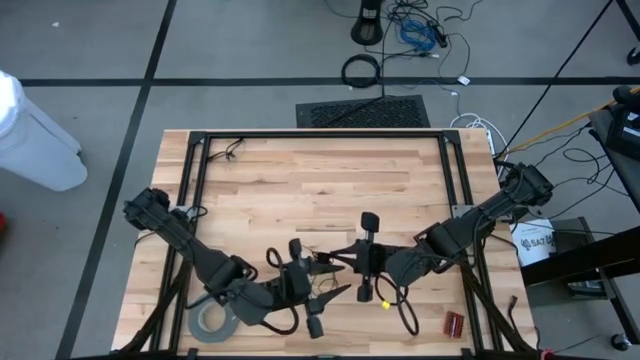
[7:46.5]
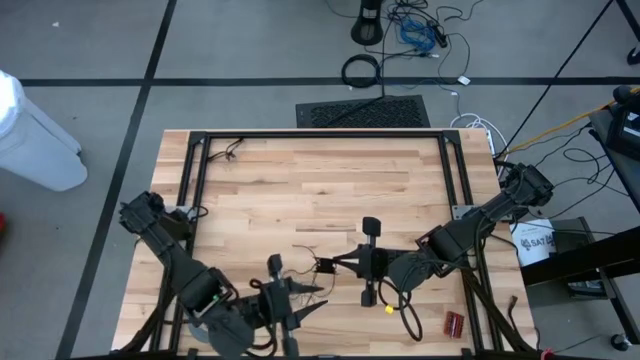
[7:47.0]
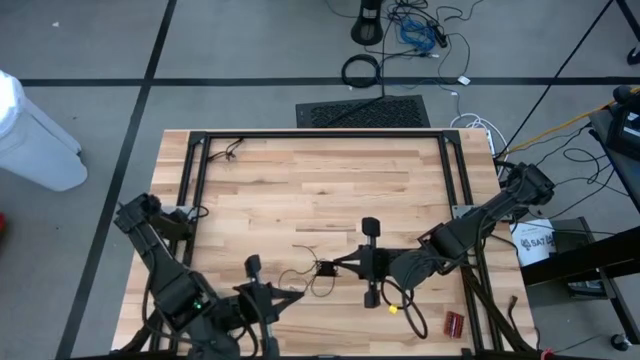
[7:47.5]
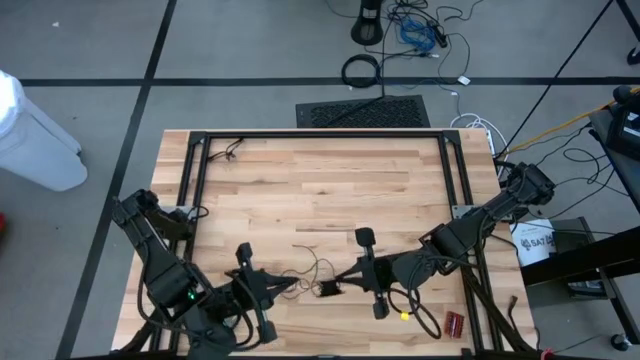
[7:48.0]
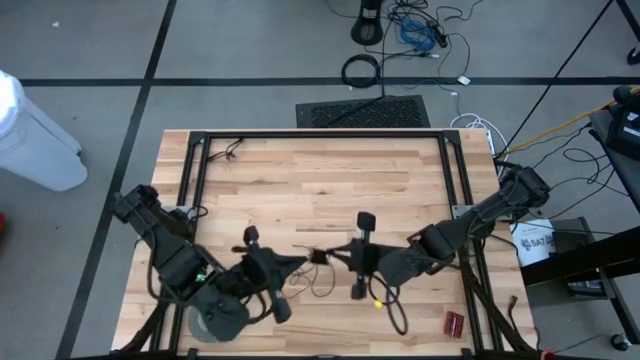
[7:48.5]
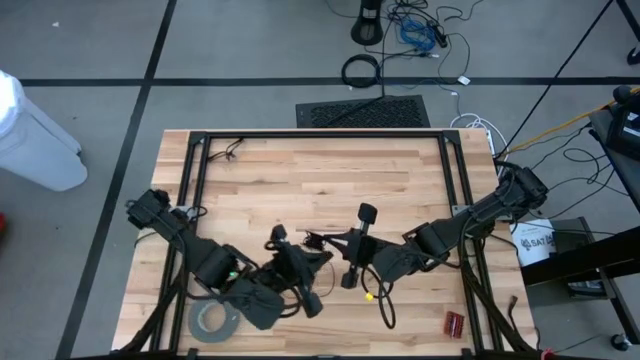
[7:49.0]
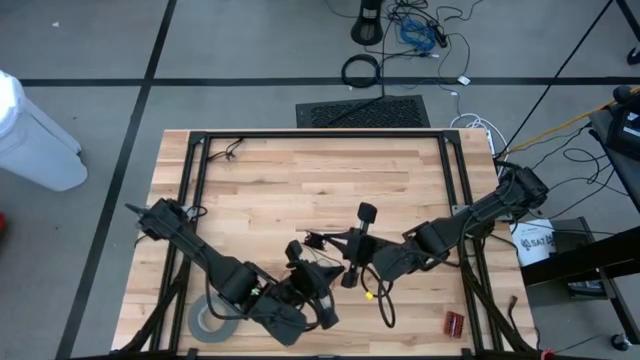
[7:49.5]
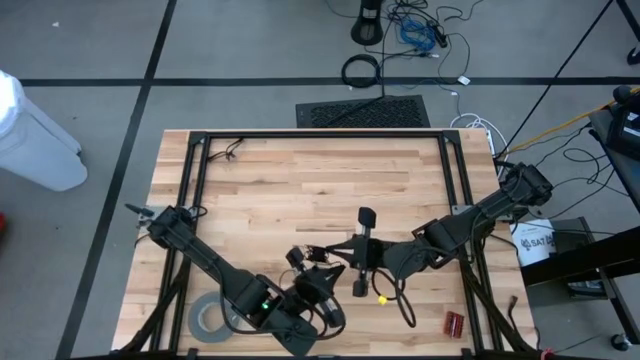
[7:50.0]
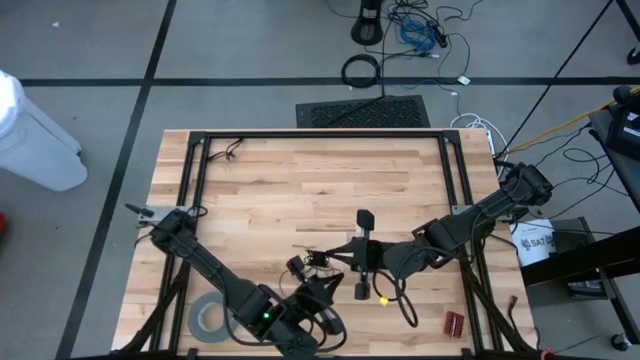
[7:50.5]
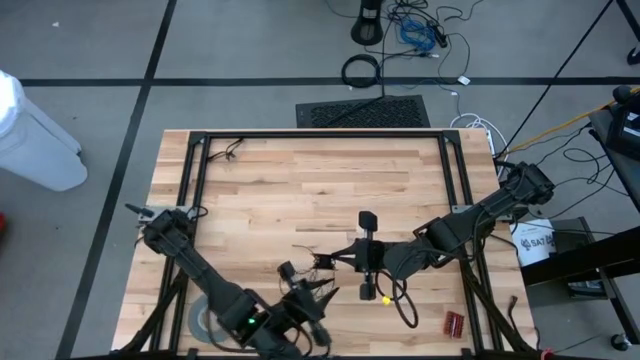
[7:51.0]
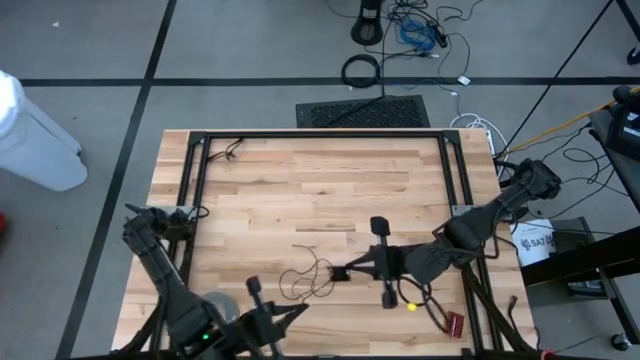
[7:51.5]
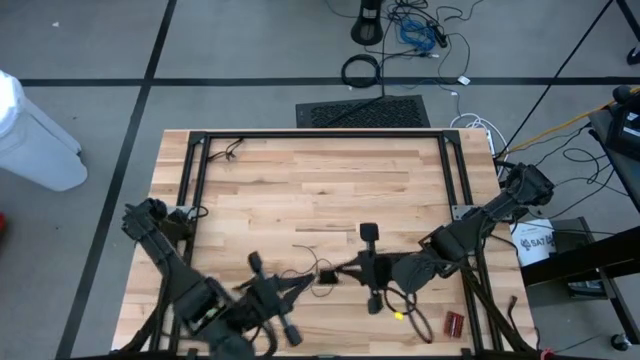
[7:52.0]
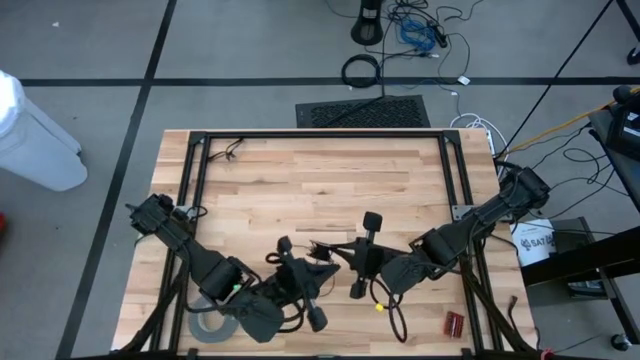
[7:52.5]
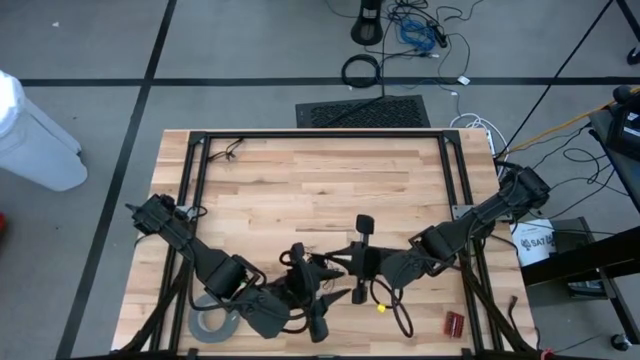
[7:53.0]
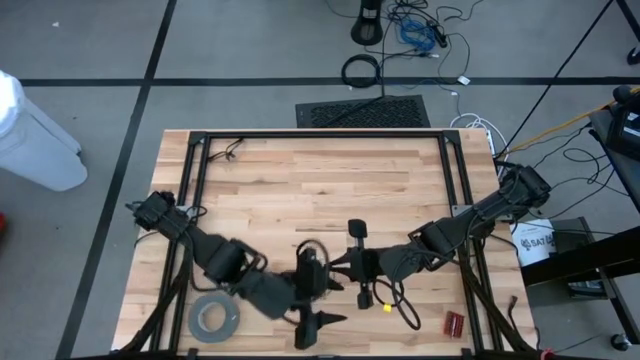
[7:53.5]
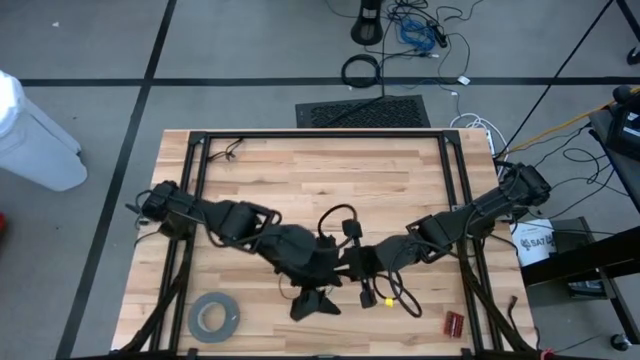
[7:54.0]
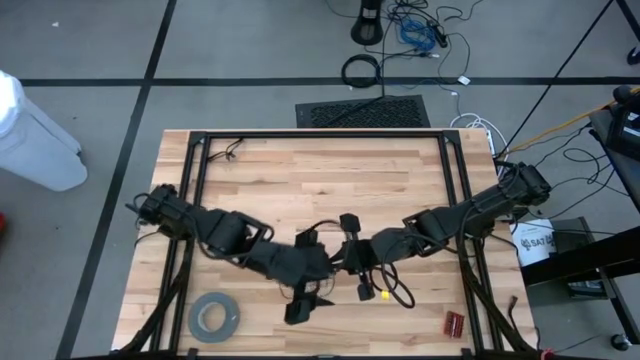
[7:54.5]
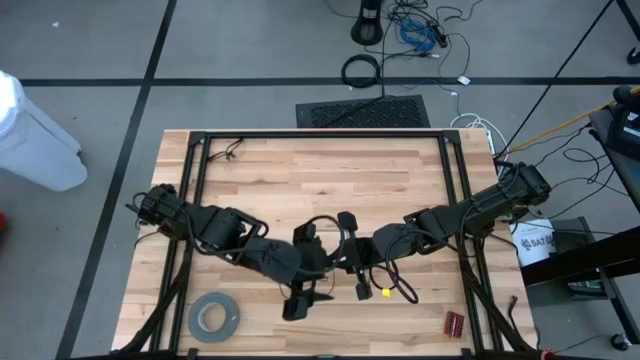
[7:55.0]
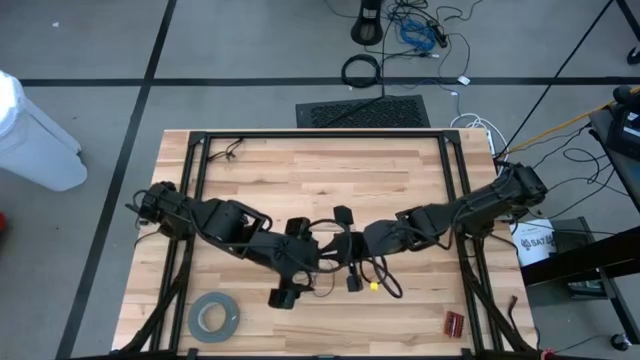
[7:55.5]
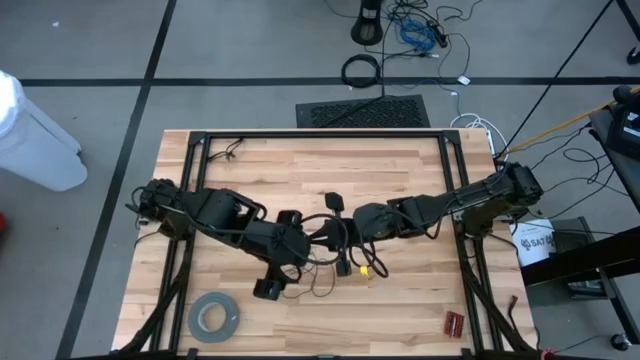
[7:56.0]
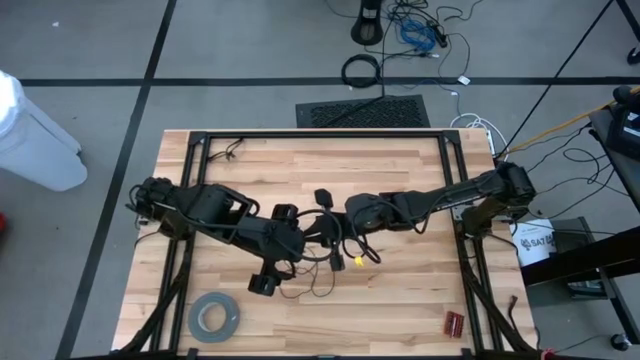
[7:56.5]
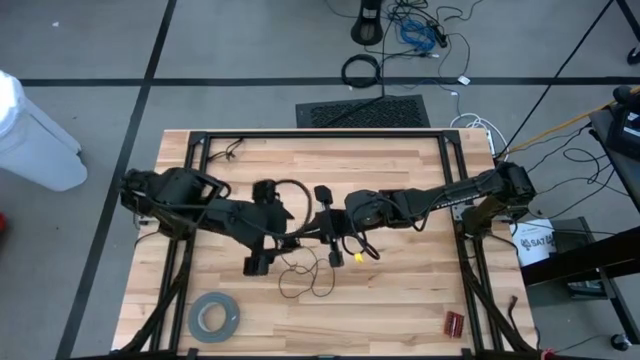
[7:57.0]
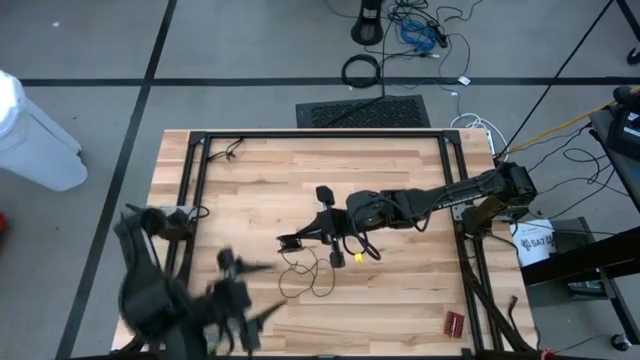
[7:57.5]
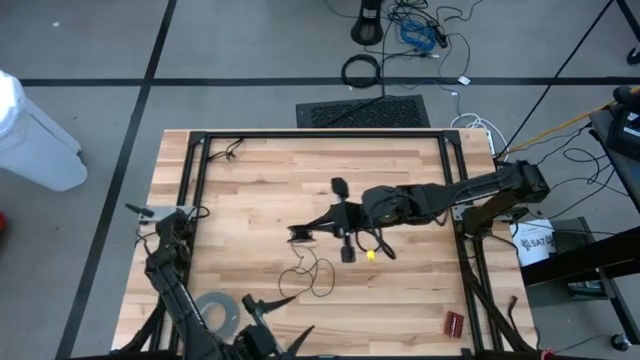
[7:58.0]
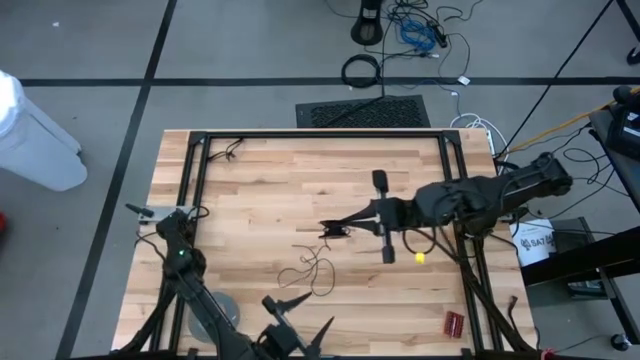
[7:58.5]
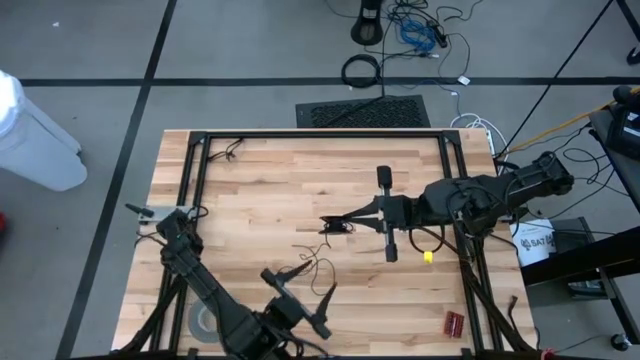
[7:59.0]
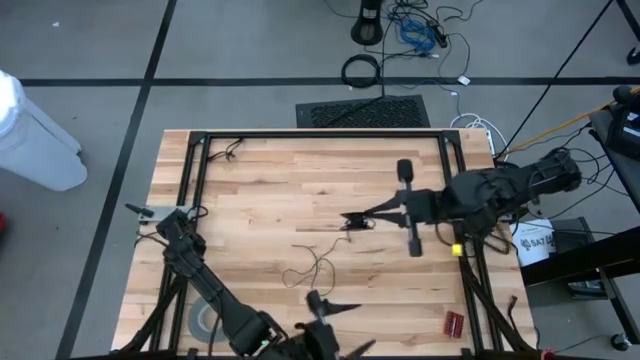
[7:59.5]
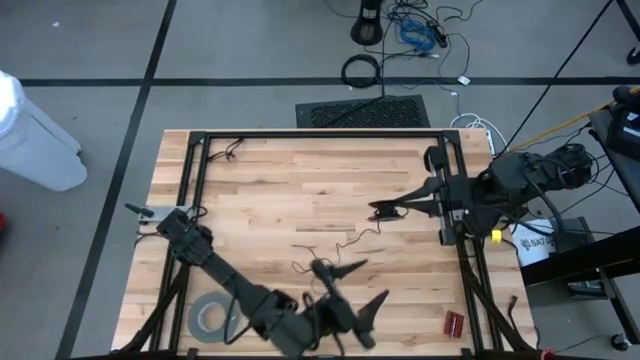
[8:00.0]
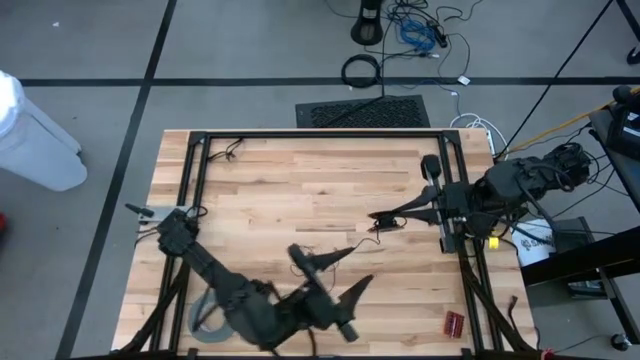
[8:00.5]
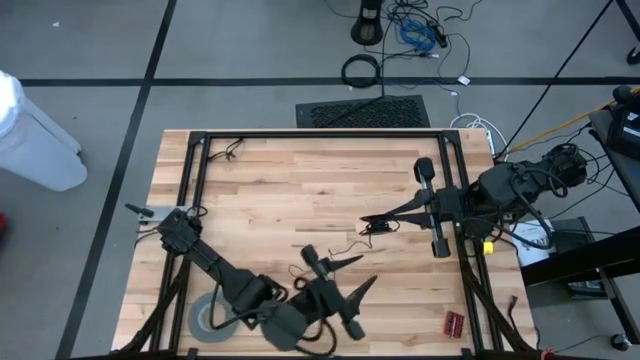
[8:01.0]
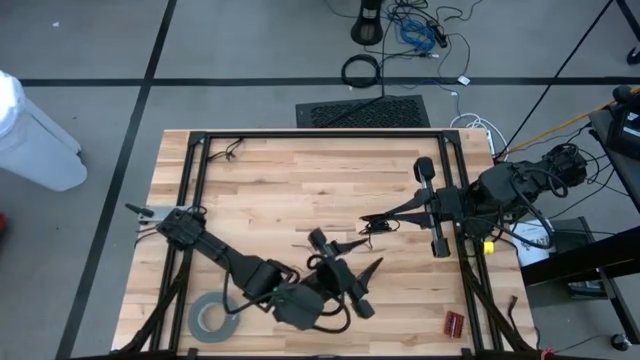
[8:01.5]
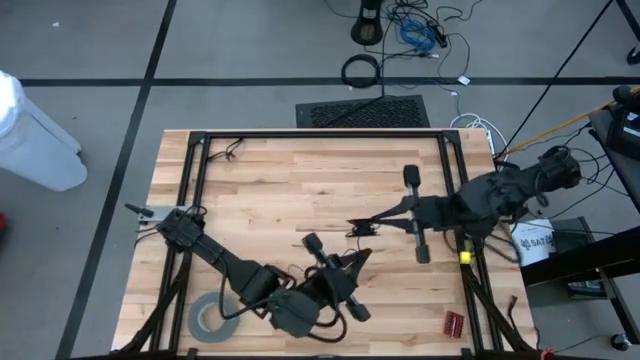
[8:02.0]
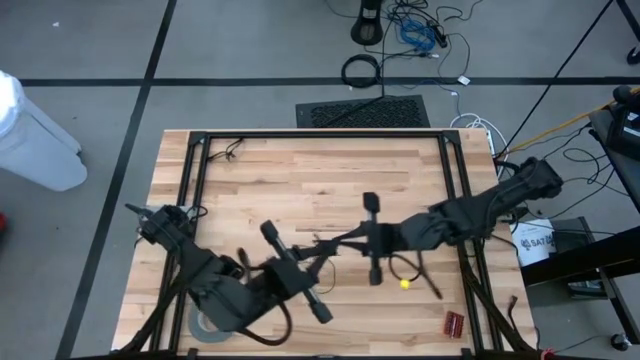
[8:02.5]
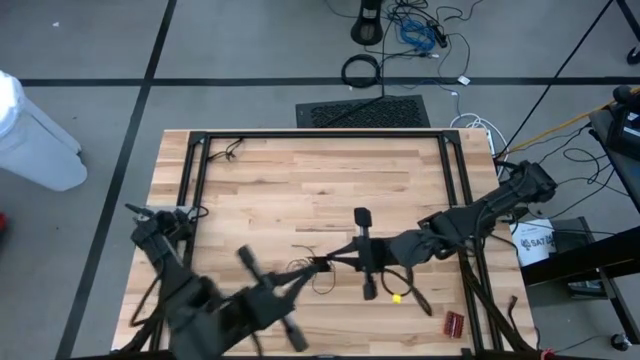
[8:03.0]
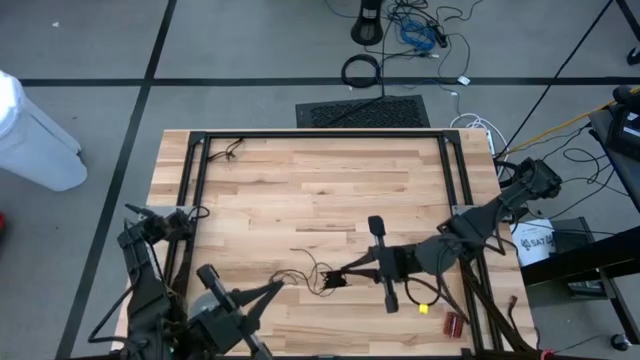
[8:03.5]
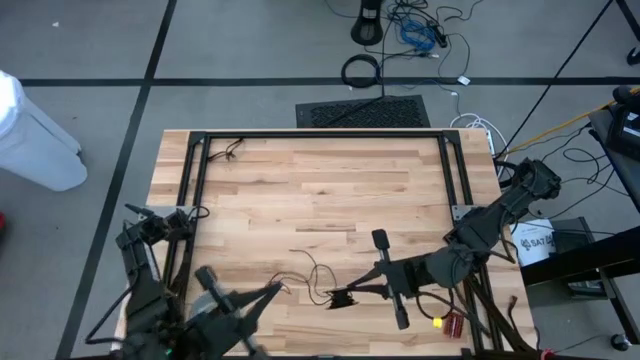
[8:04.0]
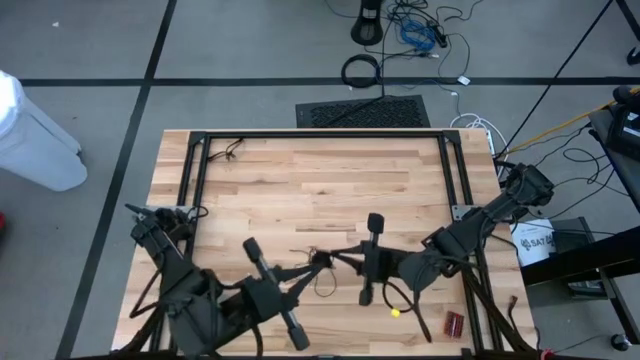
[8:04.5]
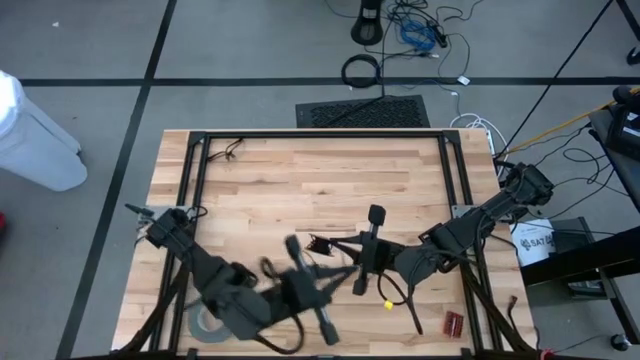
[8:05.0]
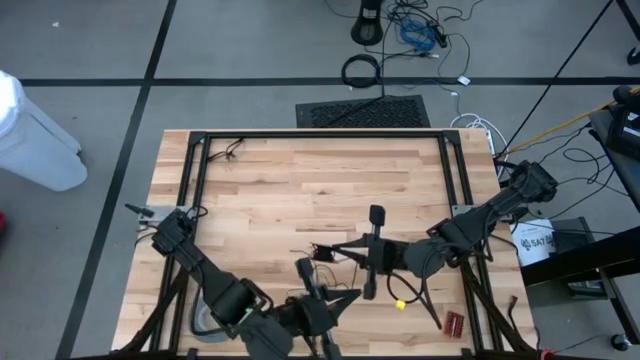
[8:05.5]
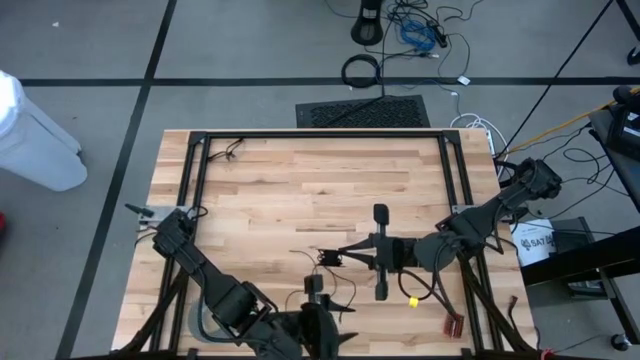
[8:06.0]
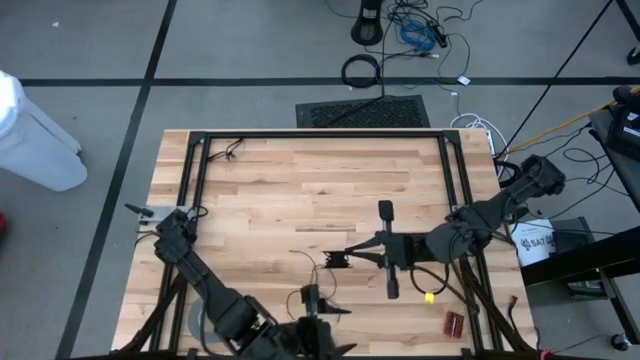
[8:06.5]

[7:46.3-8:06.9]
Task: Coil cords
Coil the black wire onto the spool
